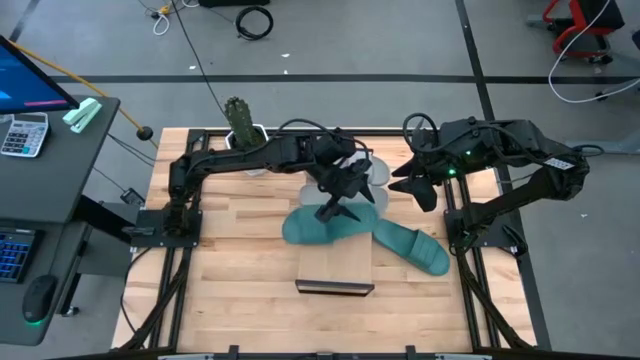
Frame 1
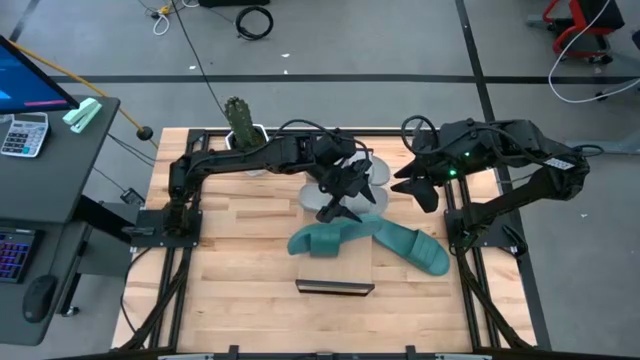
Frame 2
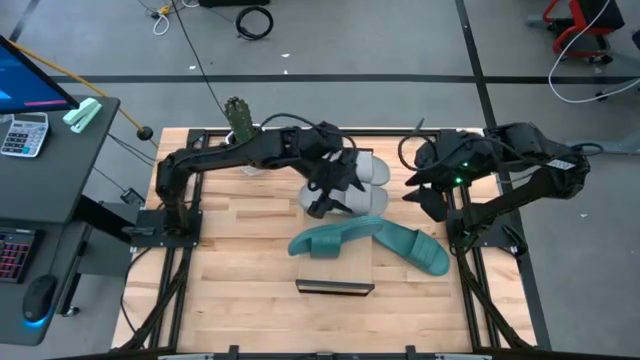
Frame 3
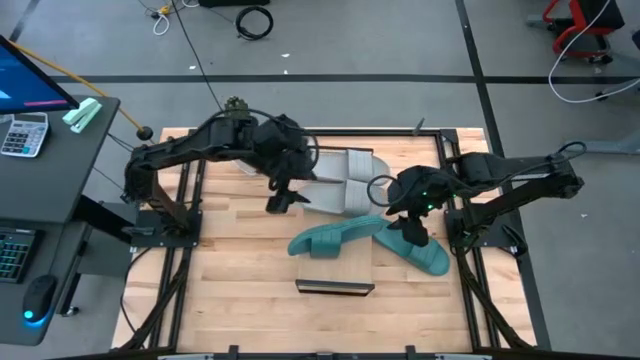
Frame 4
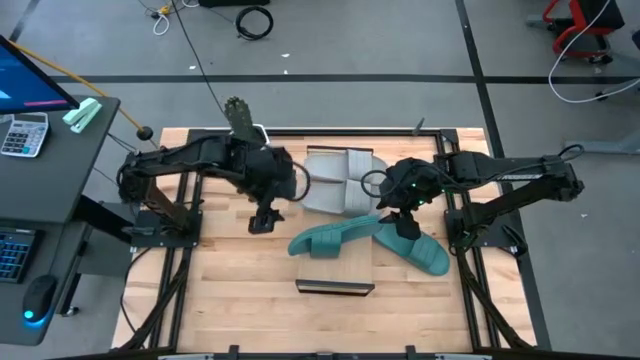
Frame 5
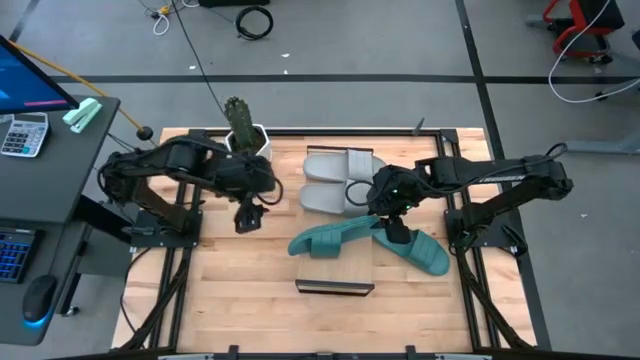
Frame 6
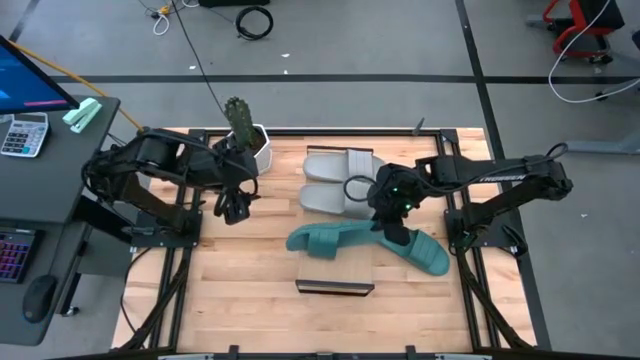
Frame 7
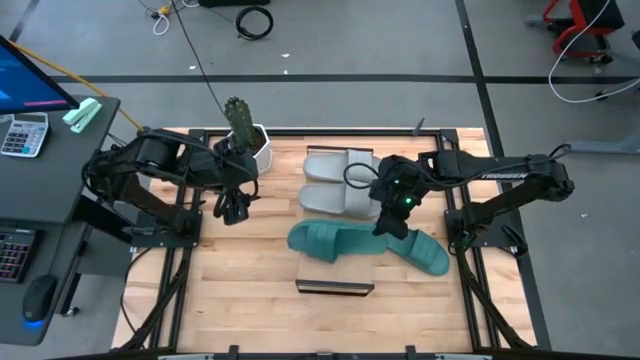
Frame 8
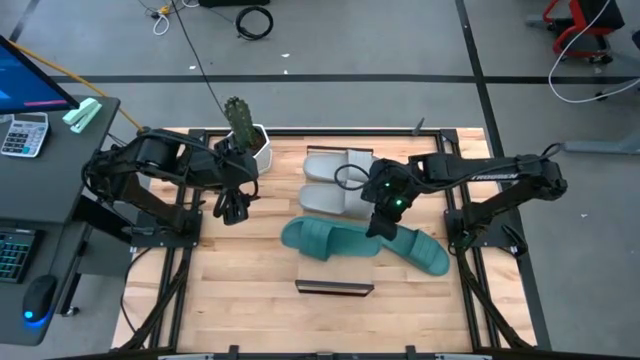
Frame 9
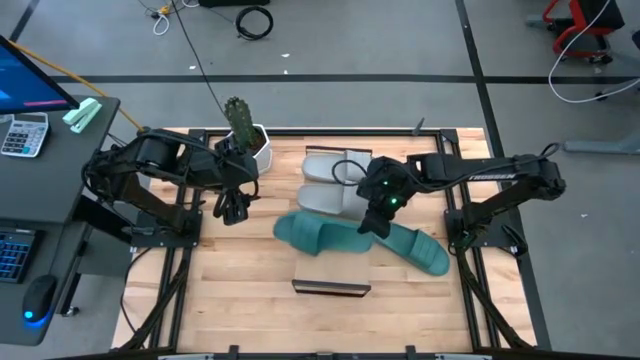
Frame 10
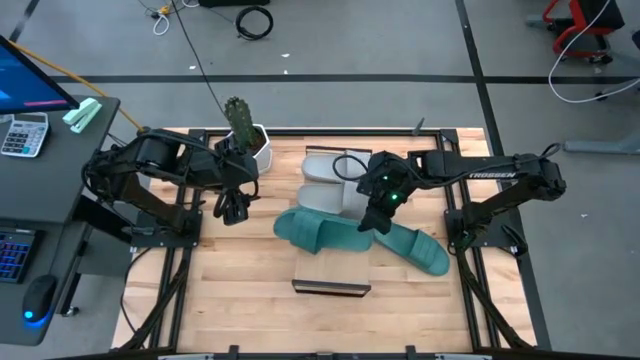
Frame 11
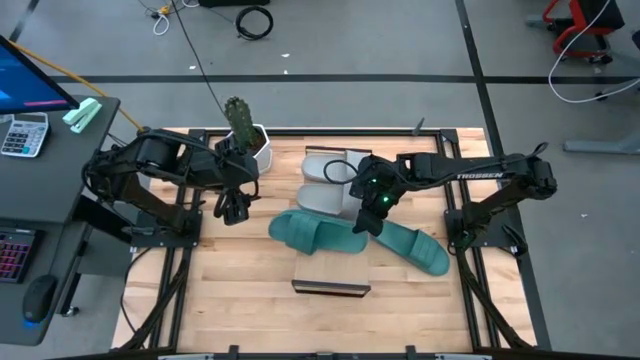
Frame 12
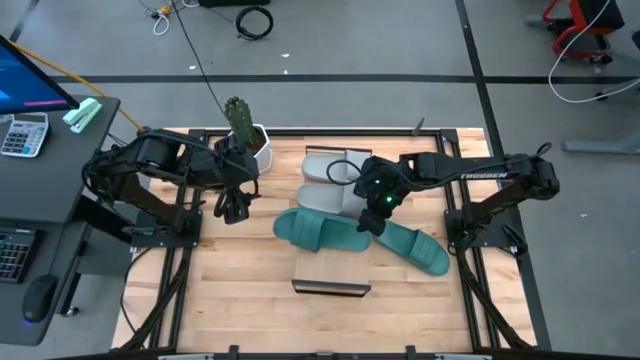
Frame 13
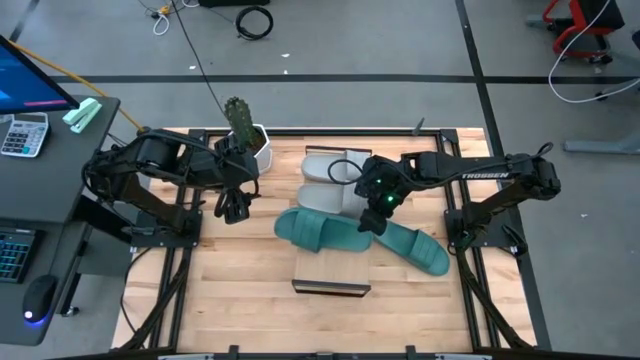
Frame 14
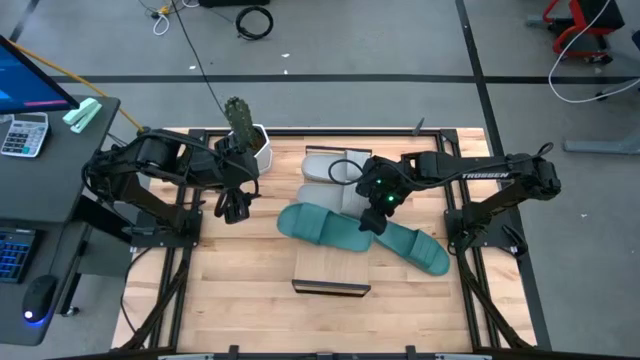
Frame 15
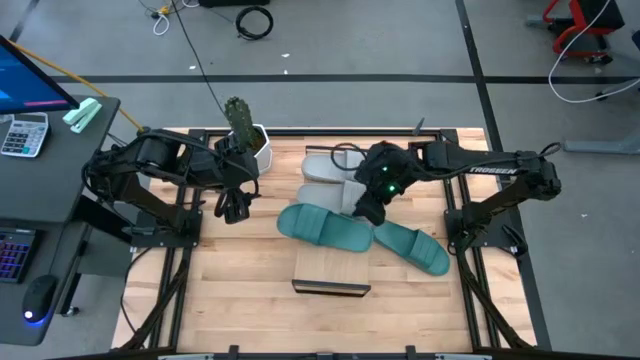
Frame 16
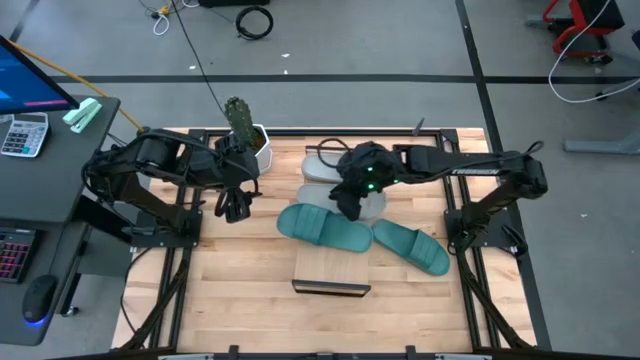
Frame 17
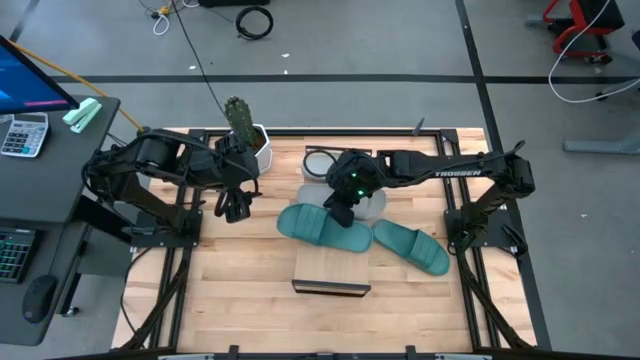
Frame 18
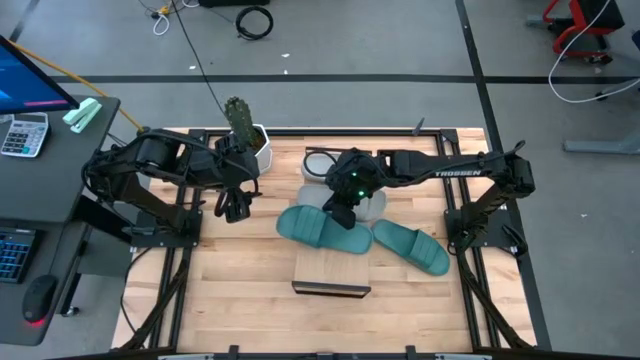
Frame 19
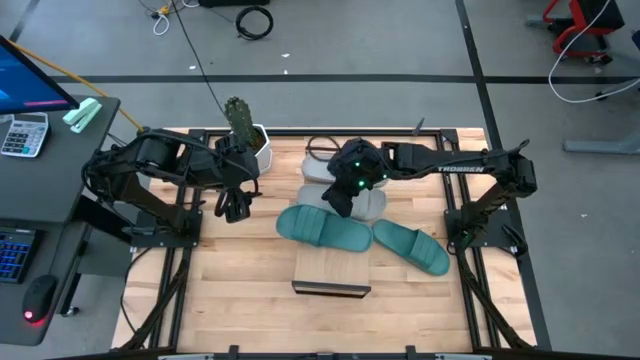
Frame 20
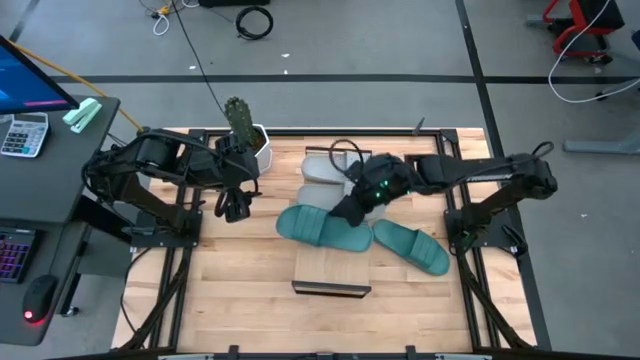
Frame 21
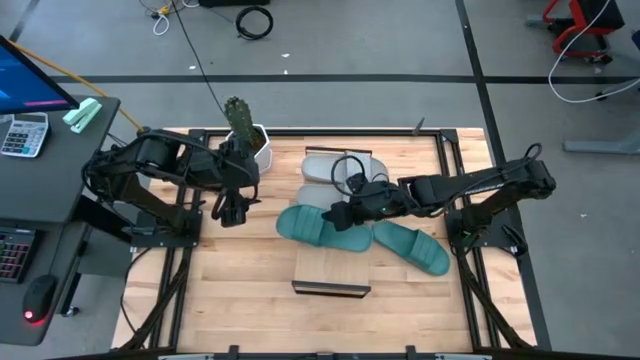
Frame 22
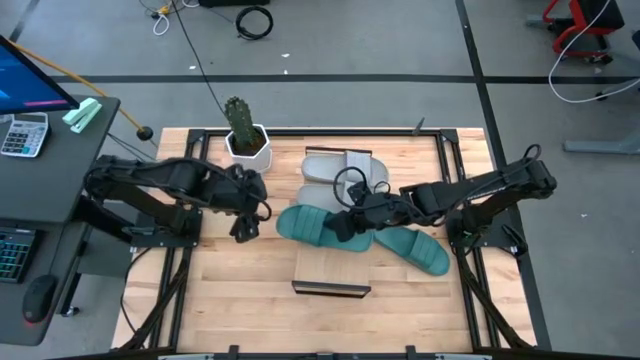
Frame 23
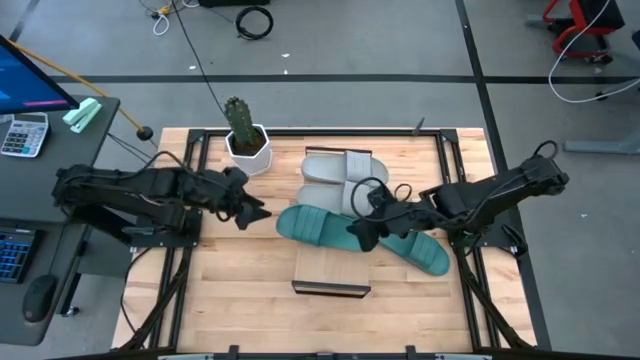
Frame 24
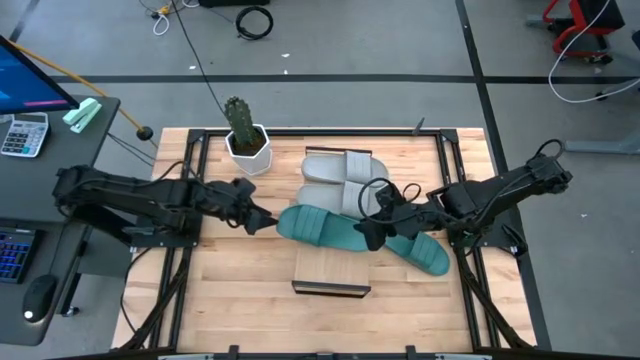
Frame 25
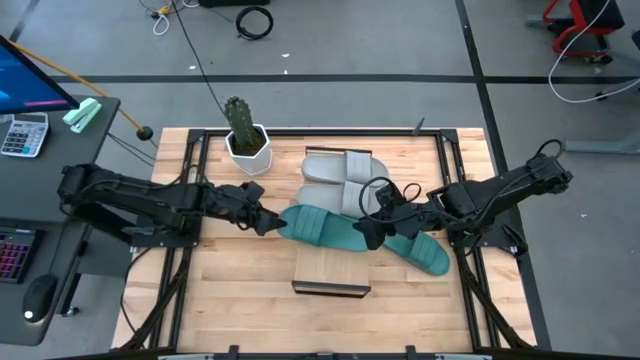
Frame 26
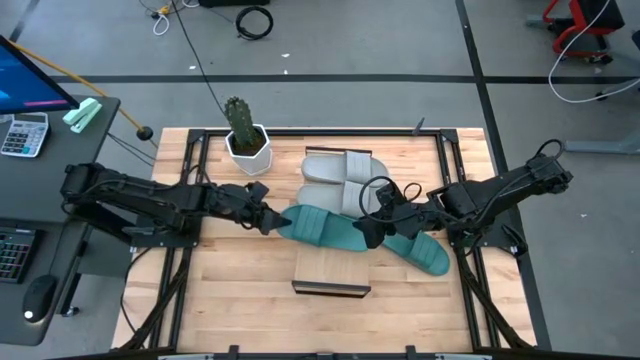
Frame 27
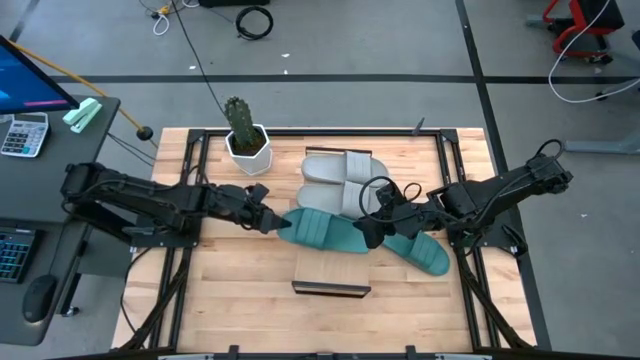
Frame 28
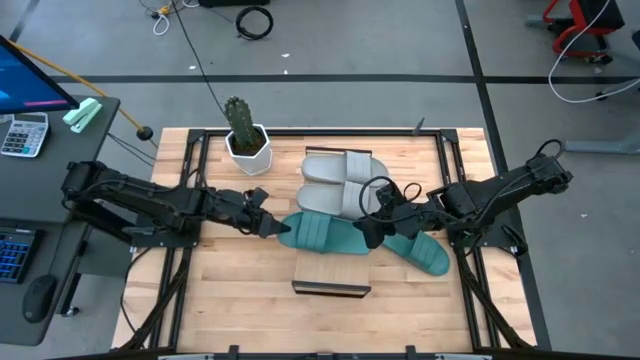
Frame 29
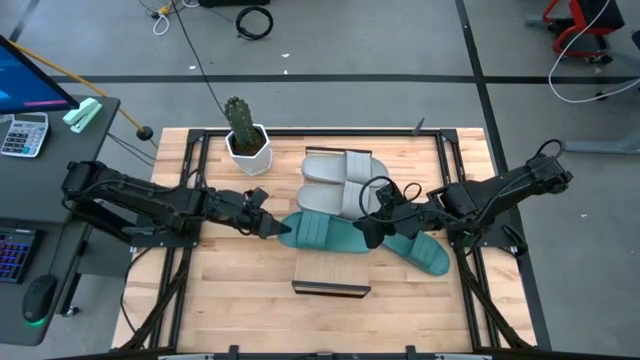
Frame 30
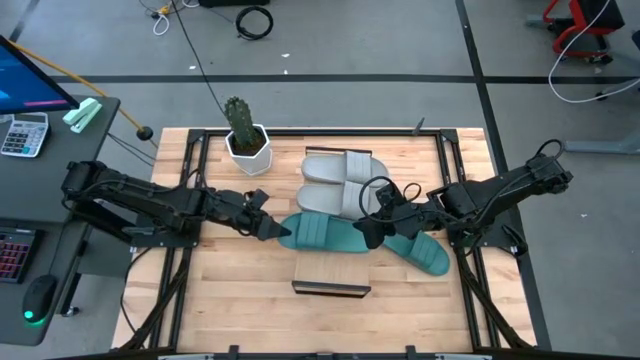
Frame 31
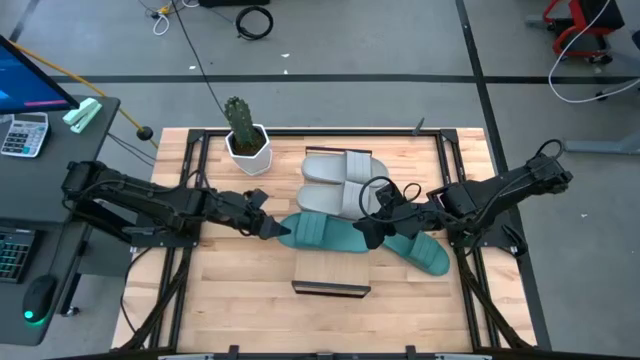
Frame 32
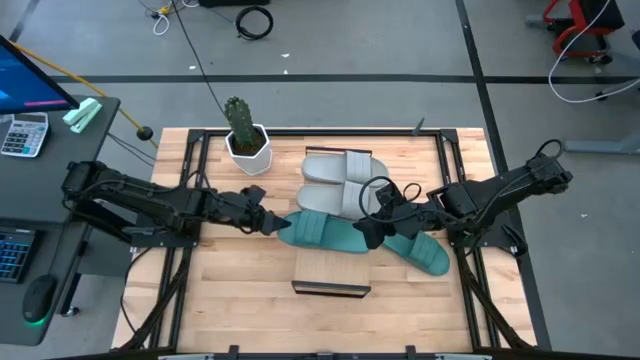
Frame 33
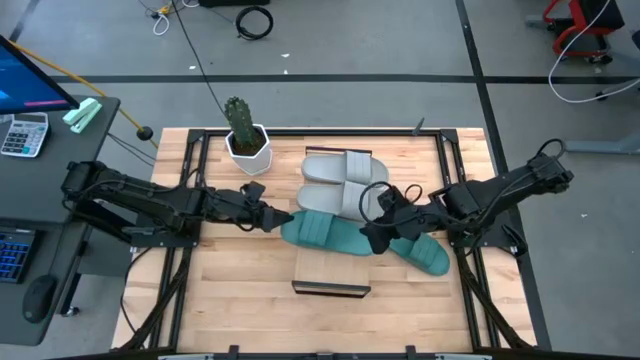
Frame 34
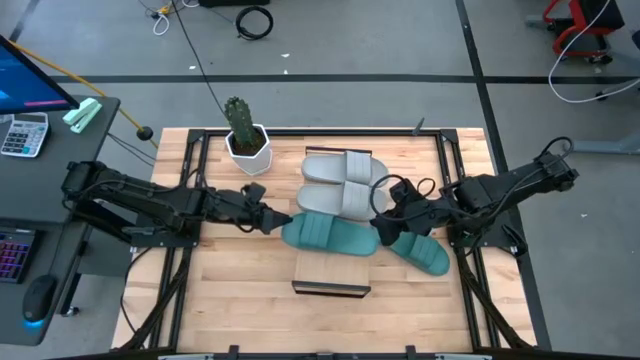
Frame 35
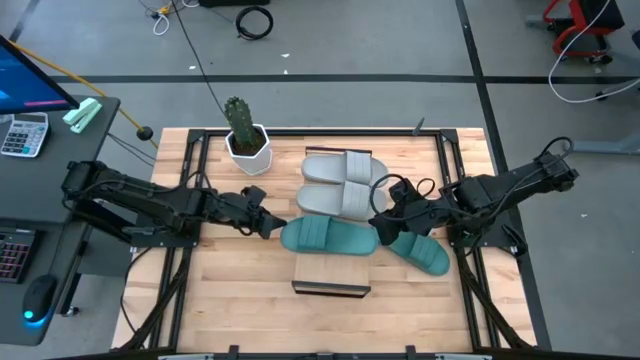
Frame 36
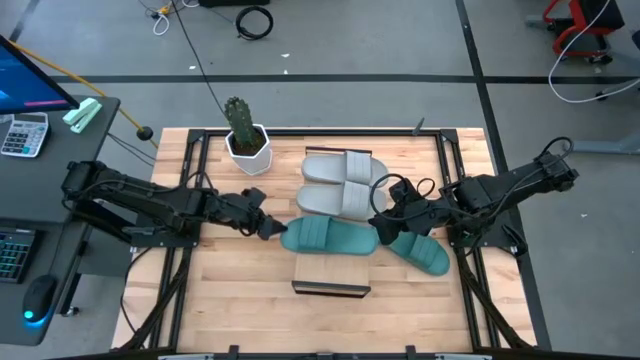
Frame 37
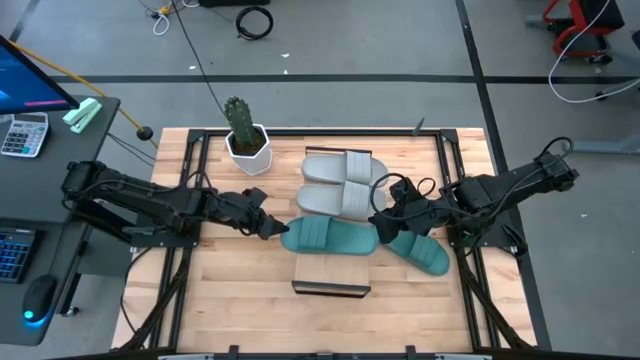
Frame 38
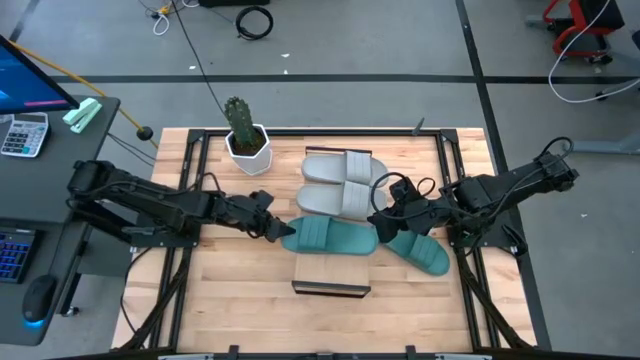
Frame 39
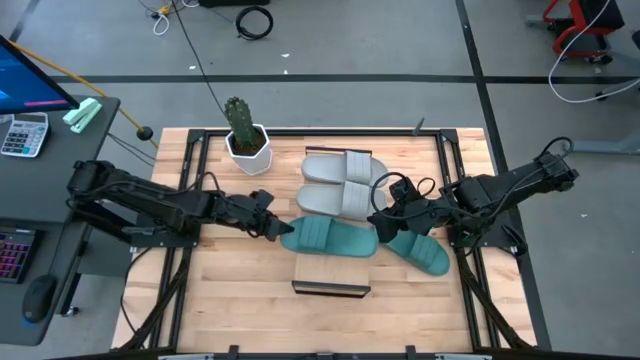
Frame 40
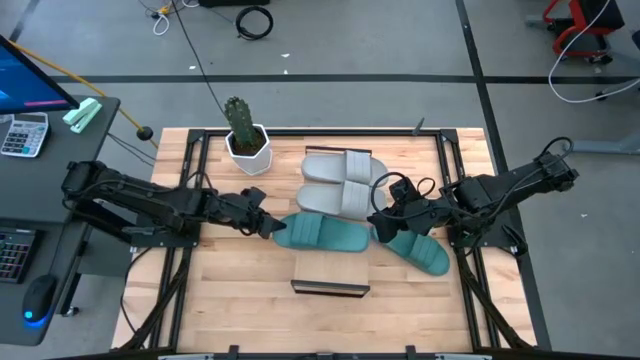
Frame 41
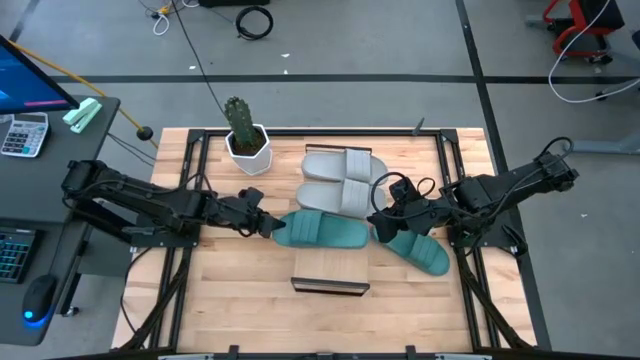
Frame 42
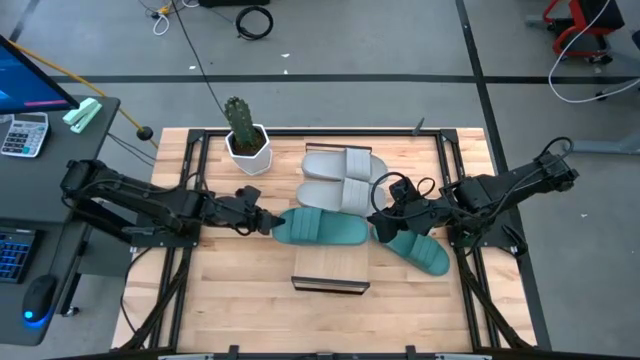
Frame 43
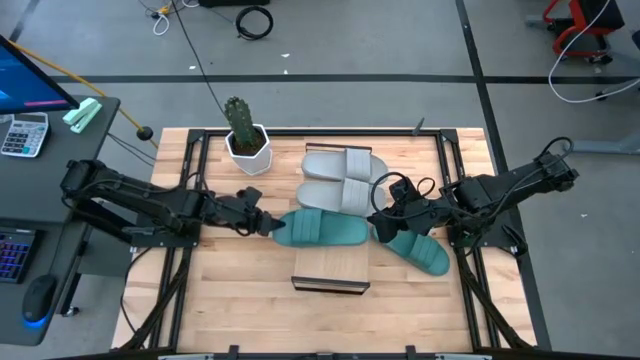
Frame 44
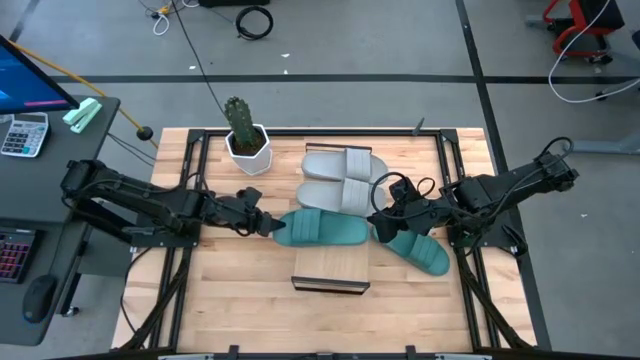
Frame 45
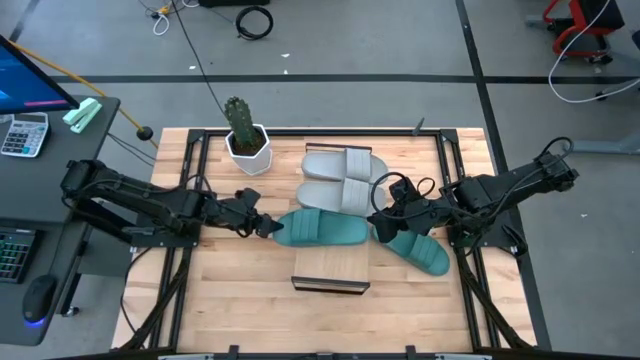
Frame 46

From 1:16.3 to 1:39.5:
Task: Pick and place slides into the shelf
Put the bottom green slipper onto the shelf
